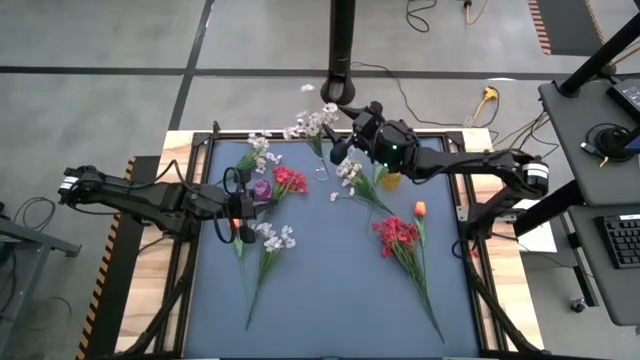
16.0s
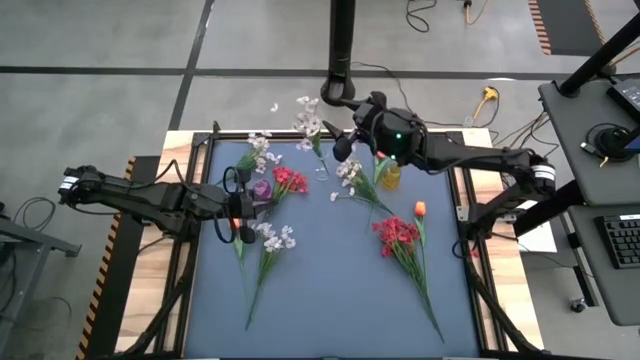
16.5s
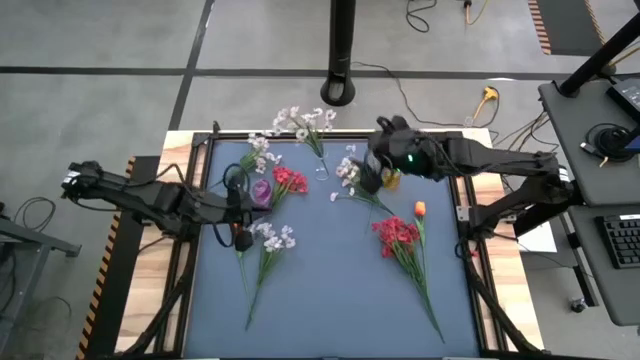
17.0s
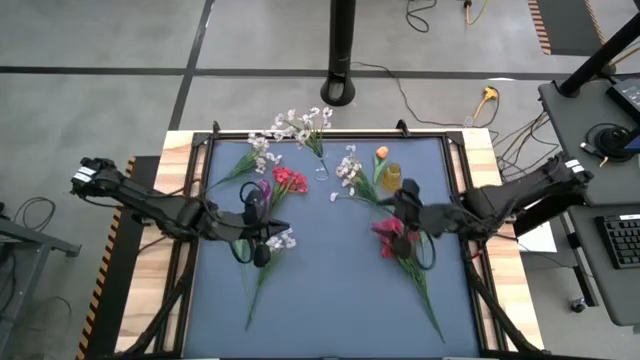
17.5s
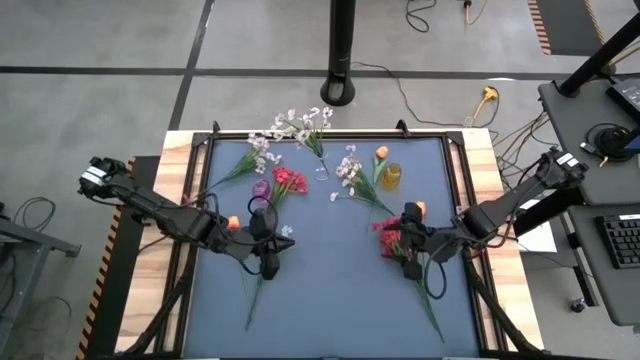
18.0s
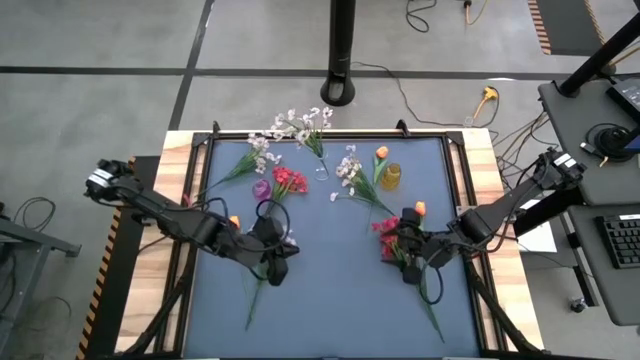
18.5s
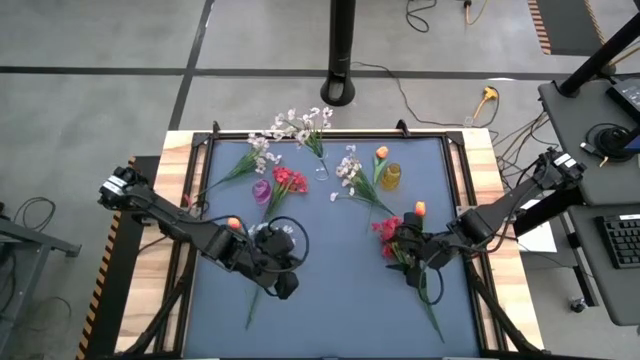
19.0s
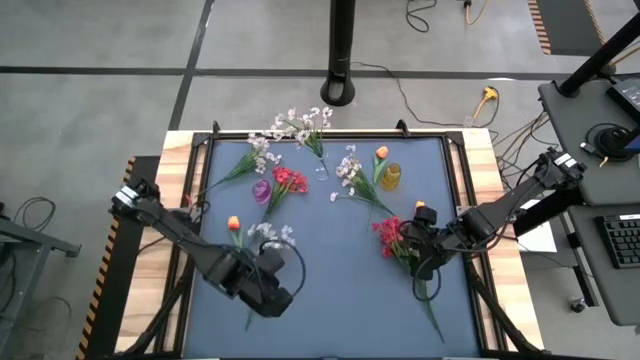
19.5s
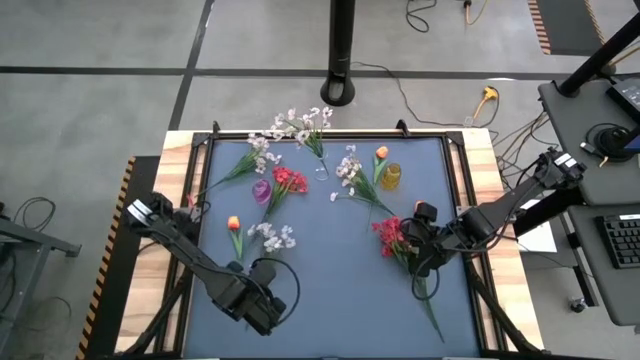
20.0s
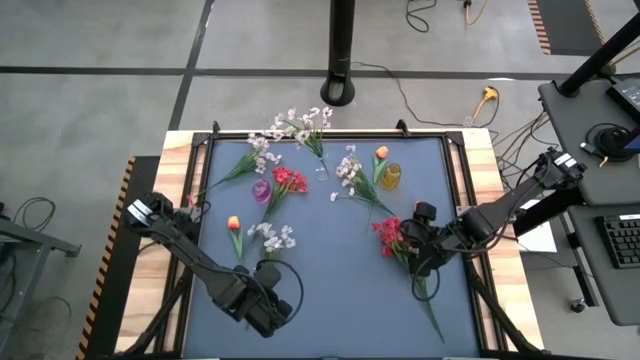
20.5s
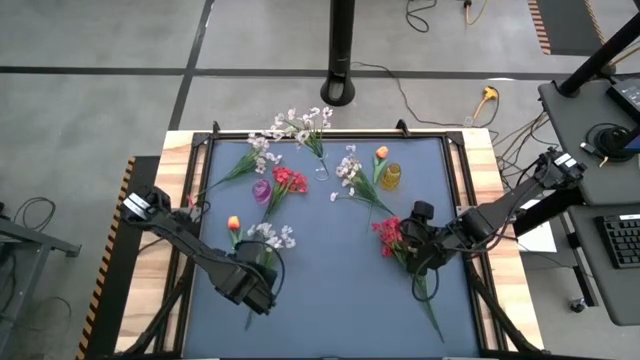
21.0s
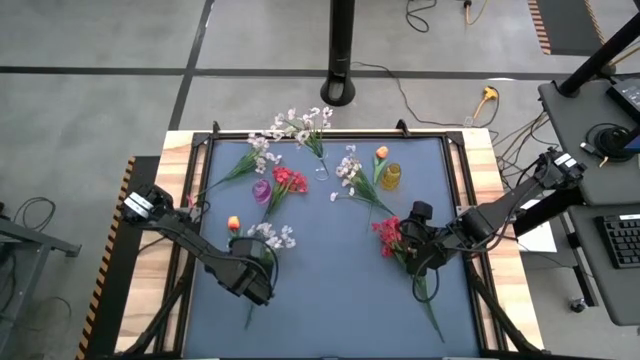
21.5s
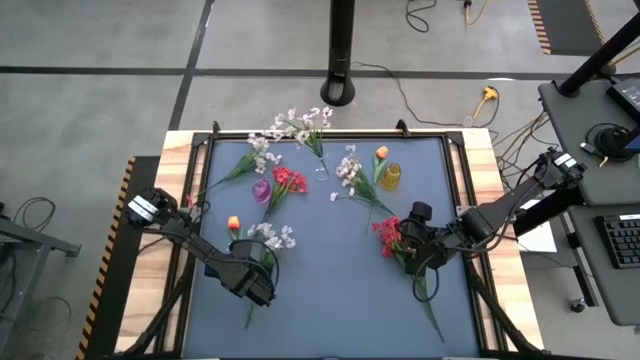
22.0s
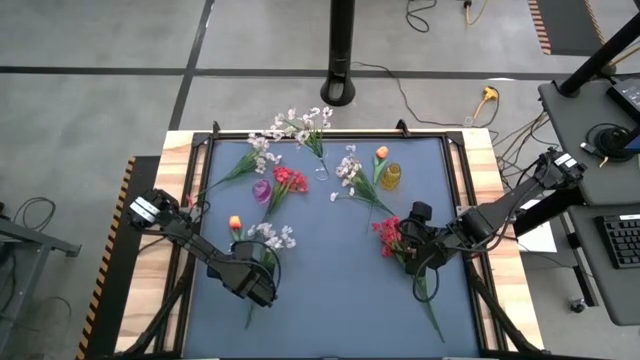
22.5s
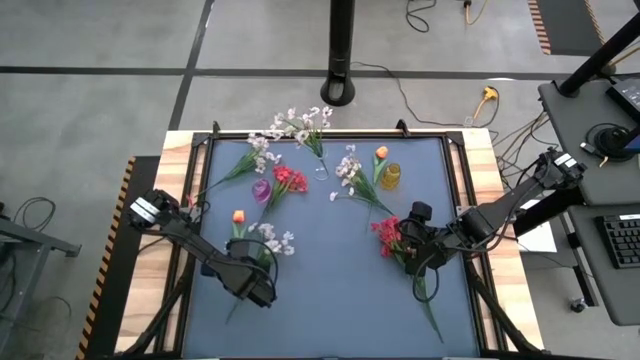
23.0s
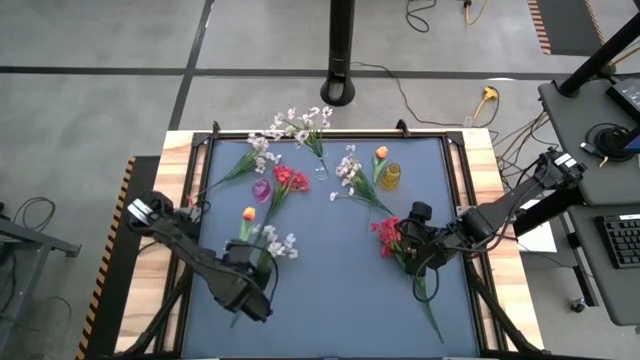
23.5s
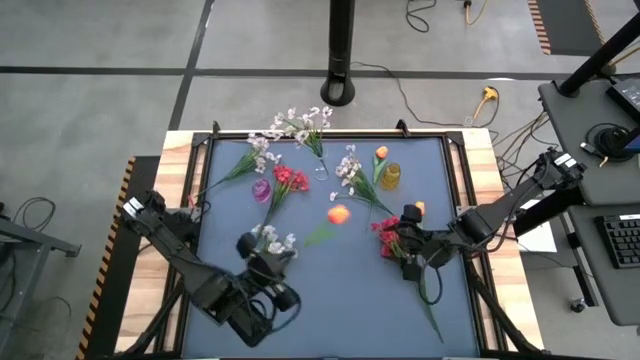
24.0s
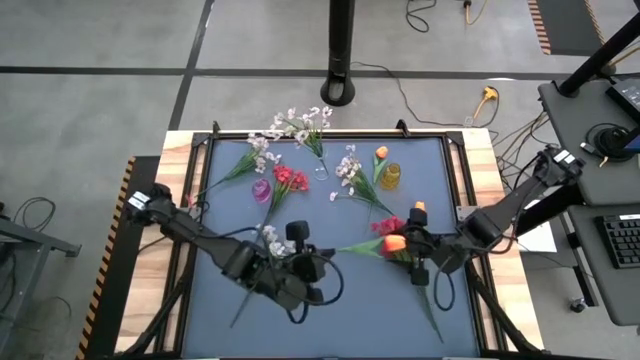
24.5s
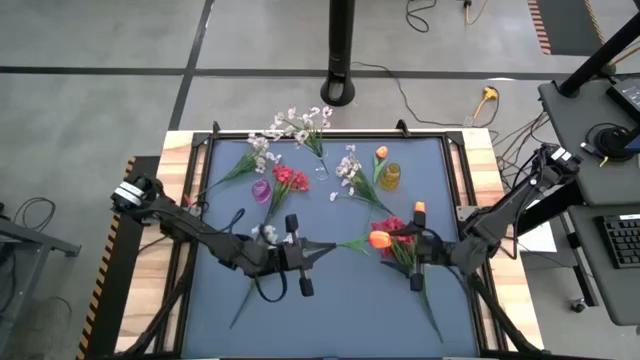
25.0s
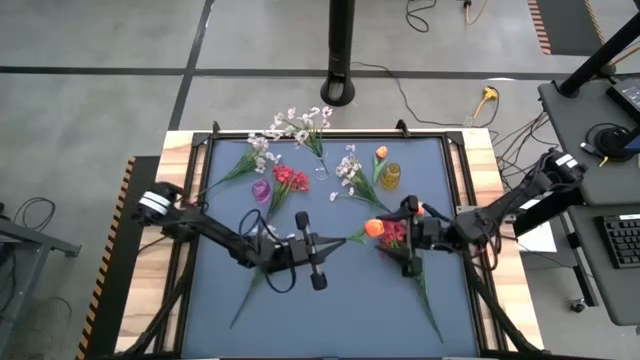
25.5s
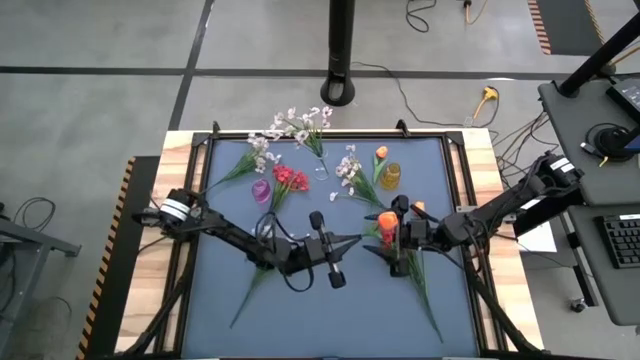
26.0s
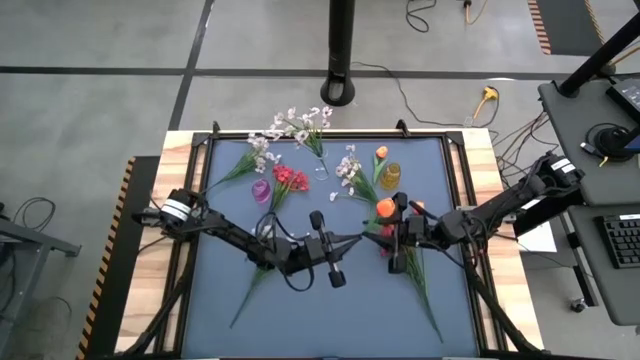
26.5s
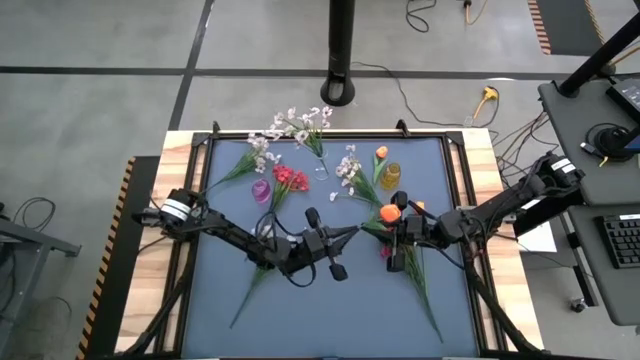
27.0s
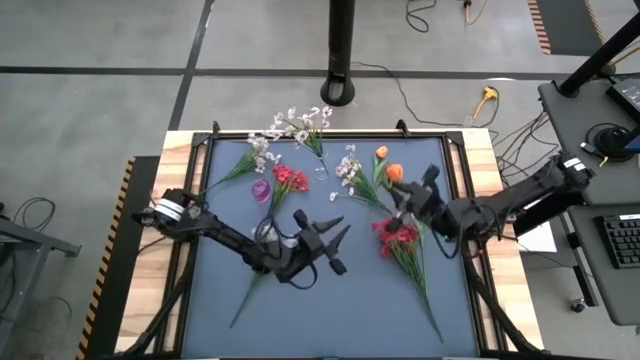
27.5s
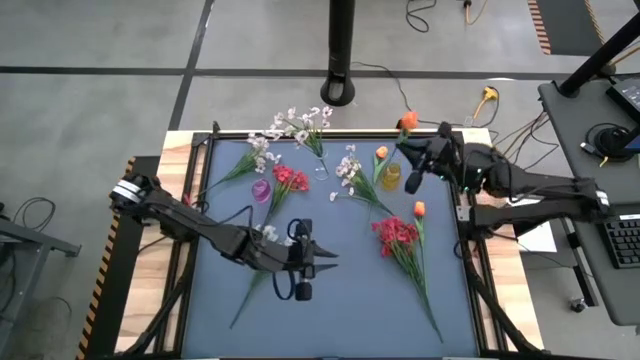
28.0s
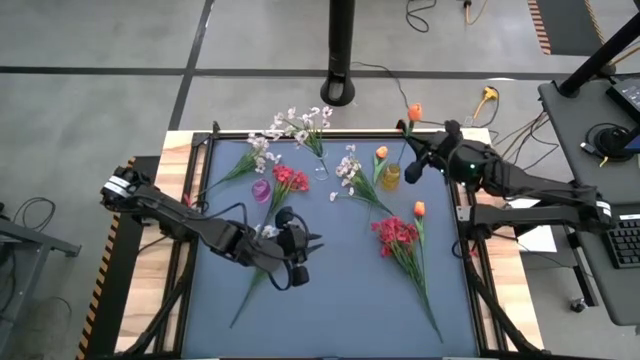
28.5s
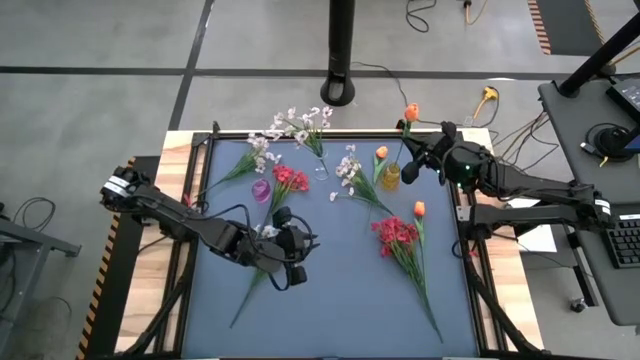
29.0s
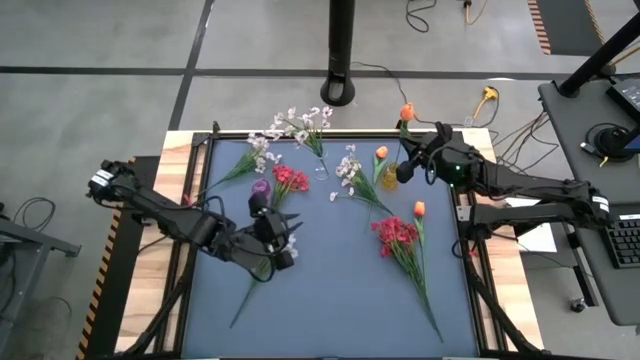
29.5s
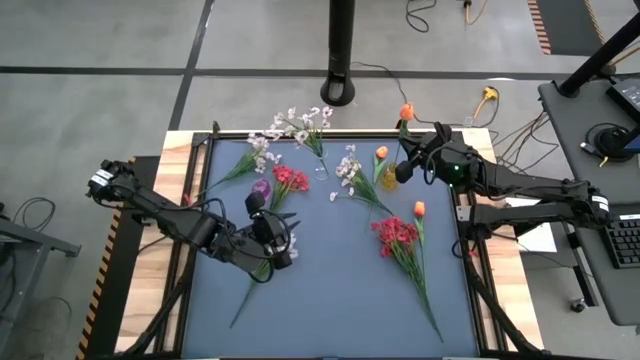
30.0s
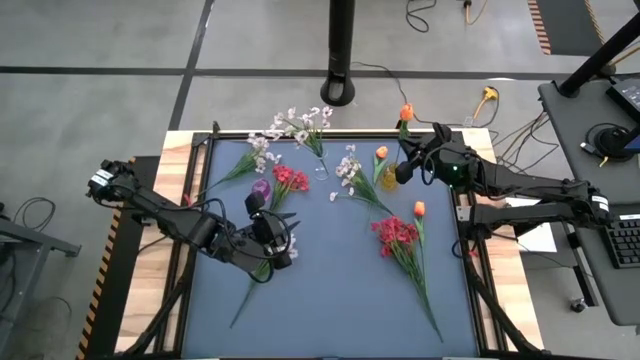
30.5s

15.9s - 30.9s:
Task: Sort flowers into vase by color
Put the orange tulip into the yellow vase

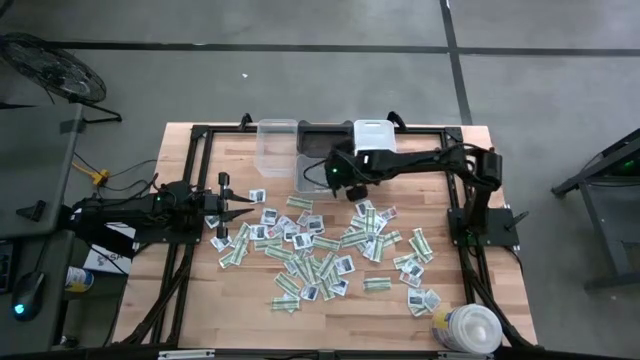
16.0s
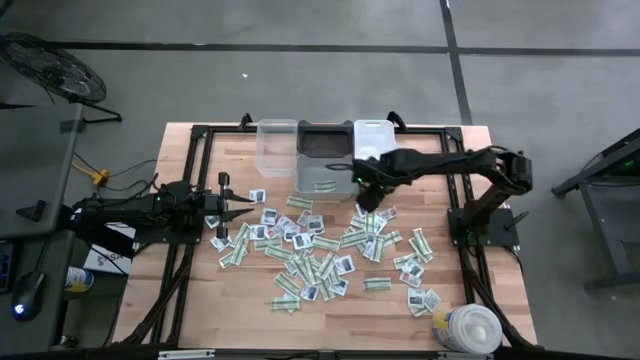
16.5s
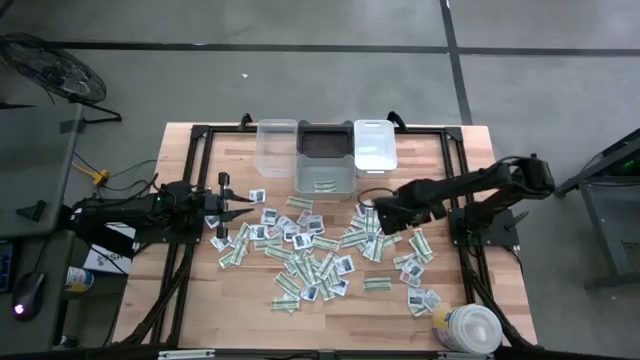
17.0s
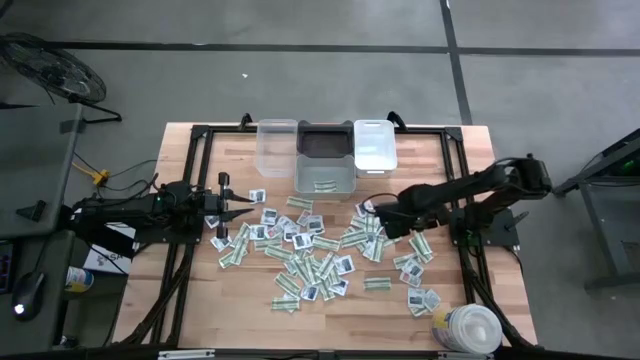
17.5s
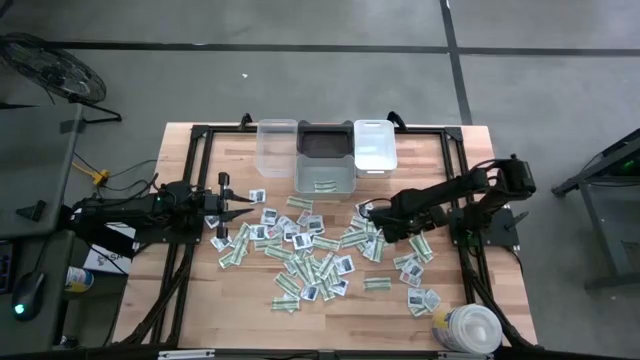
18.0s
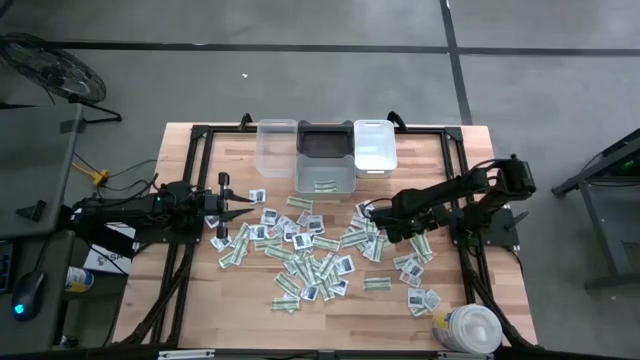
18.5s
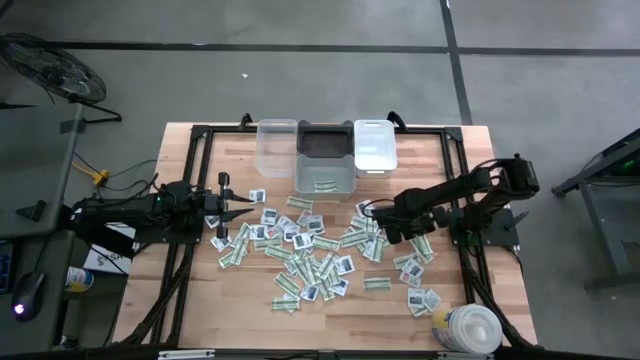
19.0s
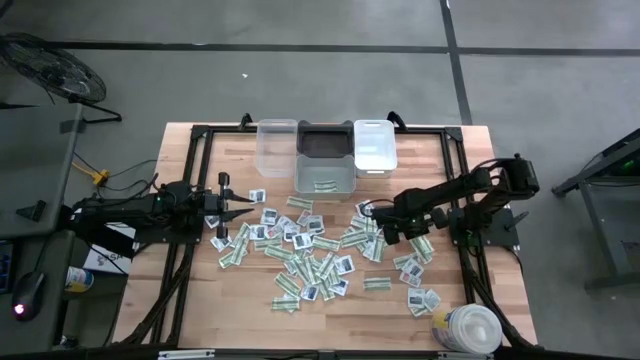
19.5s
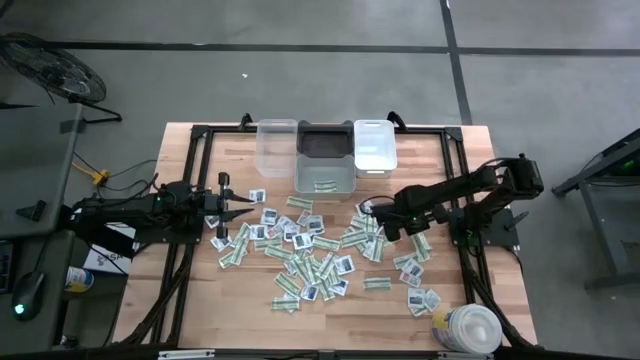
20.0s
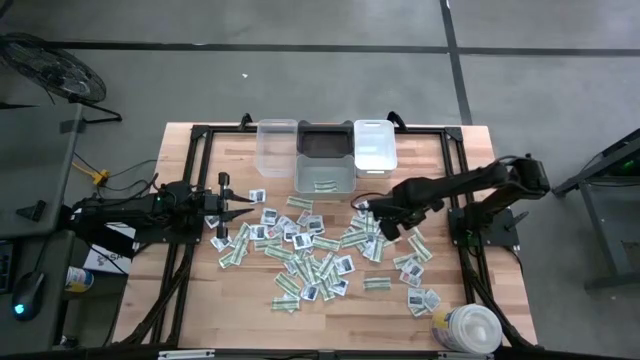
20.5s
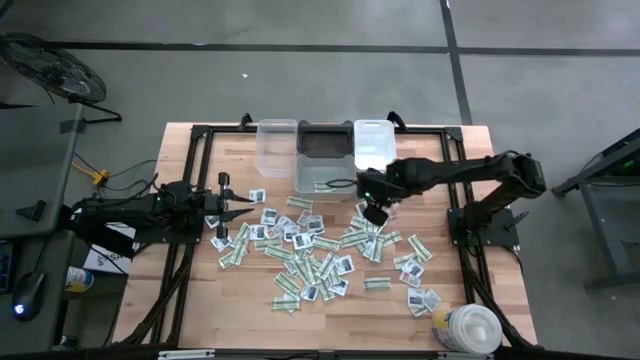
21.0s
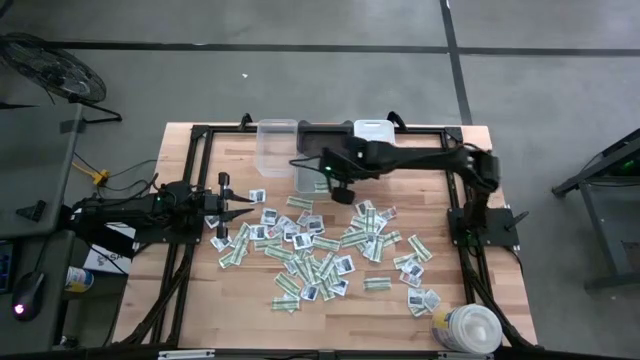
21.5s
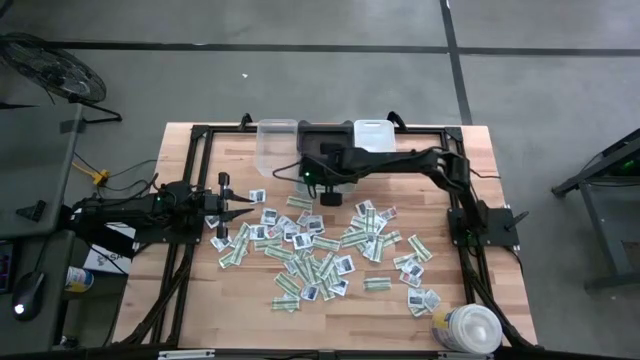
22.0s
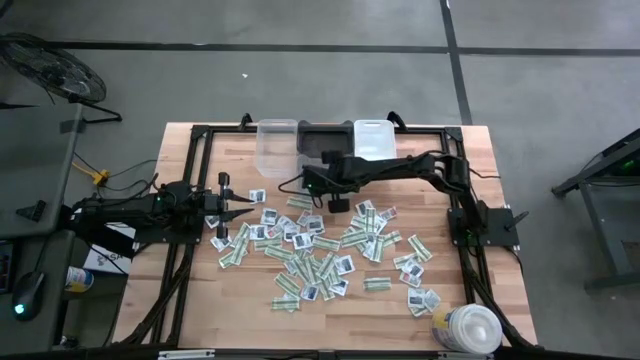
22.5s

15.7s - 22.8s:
Task: Pick & Place First Aid Supplies
Put the bandage pack into the gray bin
